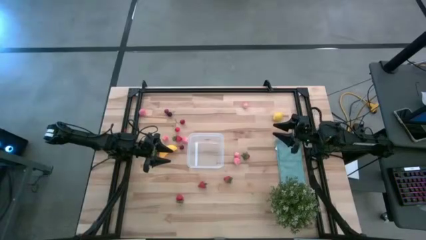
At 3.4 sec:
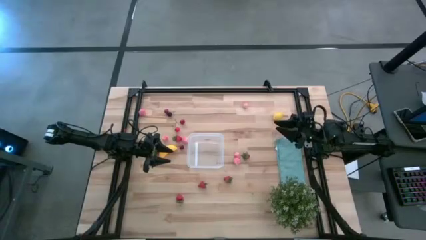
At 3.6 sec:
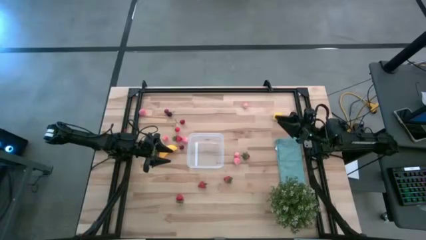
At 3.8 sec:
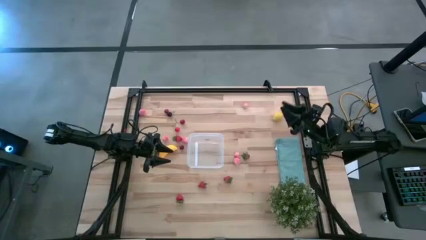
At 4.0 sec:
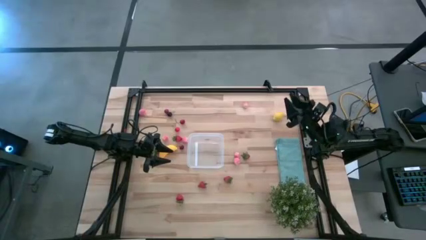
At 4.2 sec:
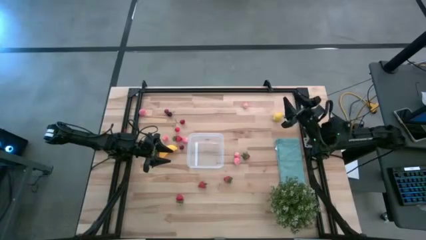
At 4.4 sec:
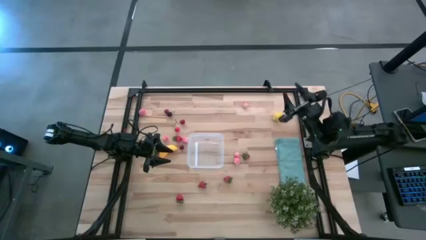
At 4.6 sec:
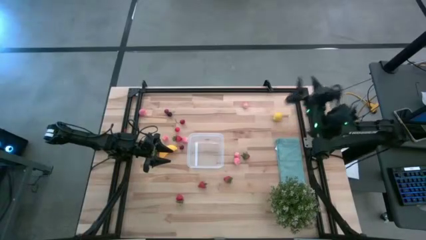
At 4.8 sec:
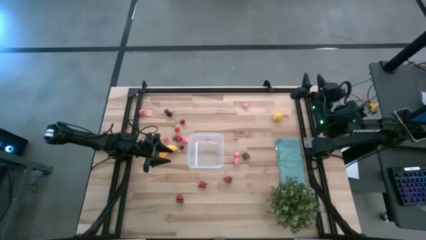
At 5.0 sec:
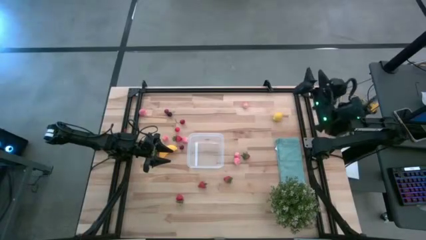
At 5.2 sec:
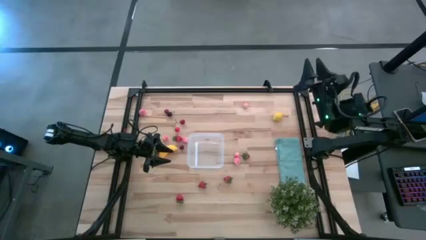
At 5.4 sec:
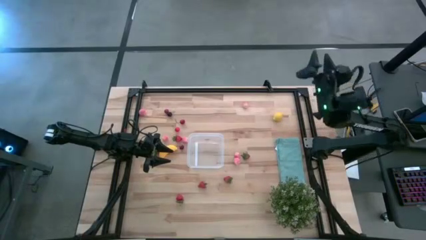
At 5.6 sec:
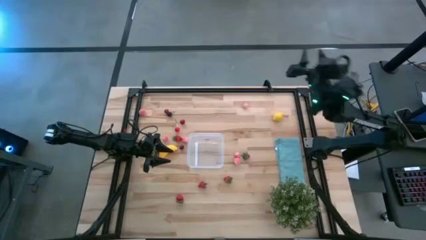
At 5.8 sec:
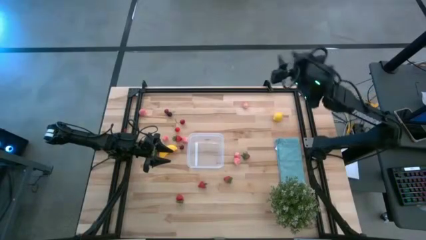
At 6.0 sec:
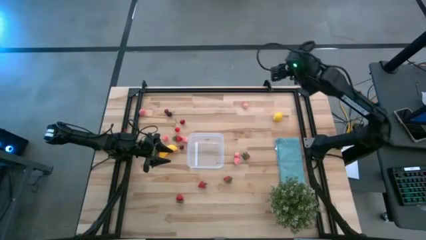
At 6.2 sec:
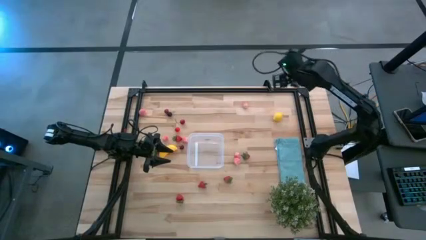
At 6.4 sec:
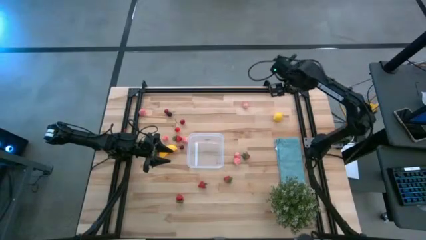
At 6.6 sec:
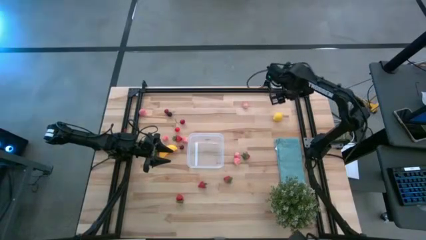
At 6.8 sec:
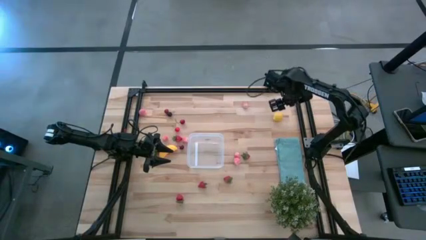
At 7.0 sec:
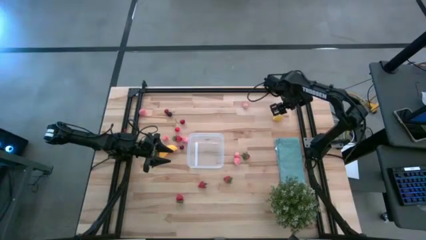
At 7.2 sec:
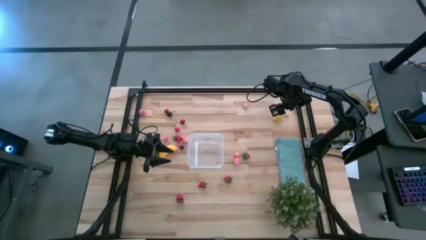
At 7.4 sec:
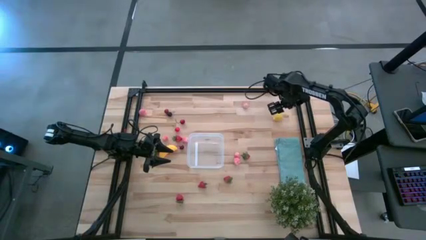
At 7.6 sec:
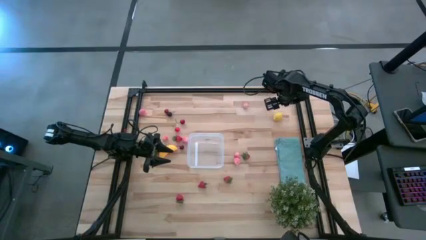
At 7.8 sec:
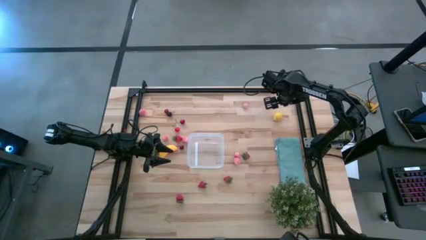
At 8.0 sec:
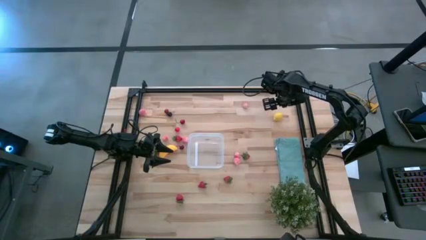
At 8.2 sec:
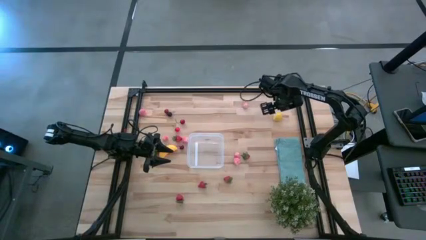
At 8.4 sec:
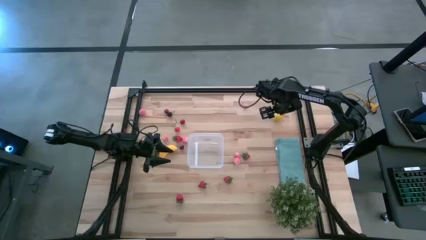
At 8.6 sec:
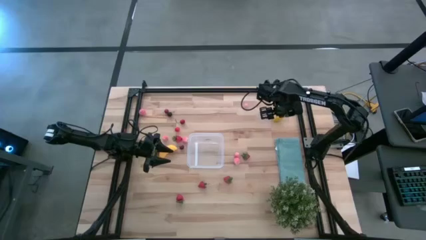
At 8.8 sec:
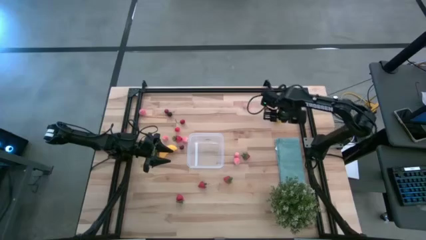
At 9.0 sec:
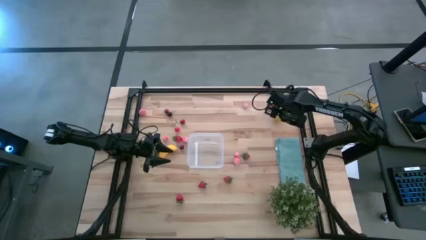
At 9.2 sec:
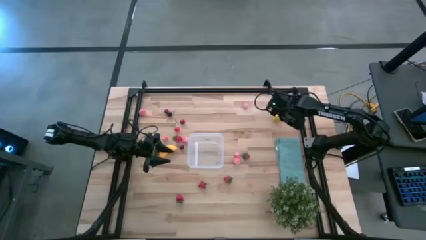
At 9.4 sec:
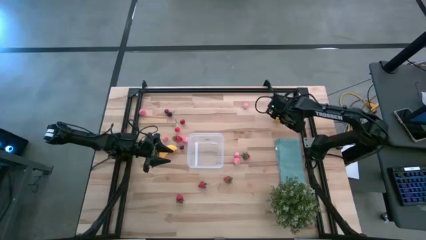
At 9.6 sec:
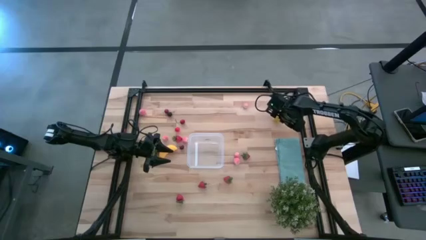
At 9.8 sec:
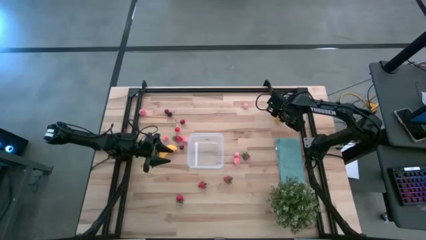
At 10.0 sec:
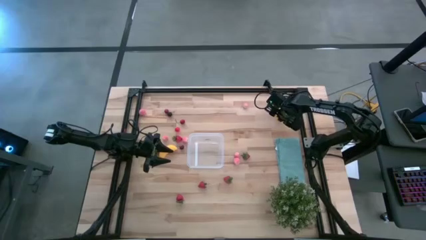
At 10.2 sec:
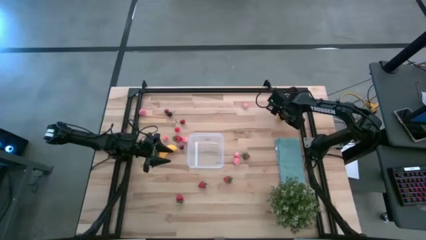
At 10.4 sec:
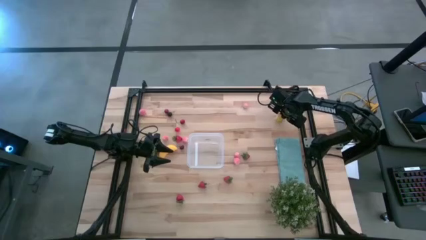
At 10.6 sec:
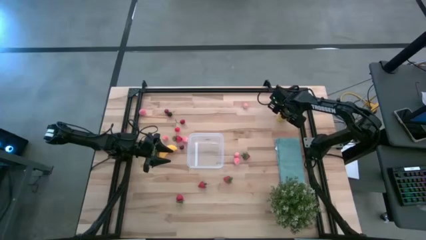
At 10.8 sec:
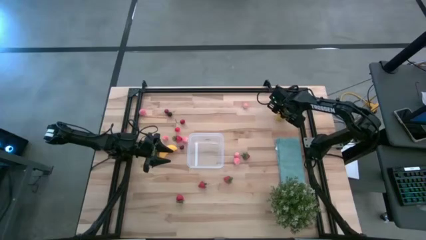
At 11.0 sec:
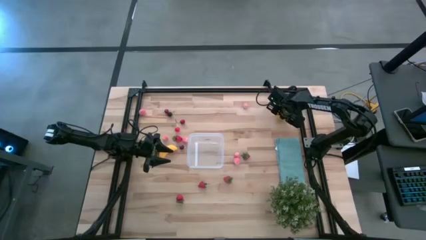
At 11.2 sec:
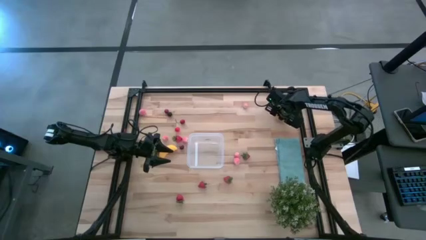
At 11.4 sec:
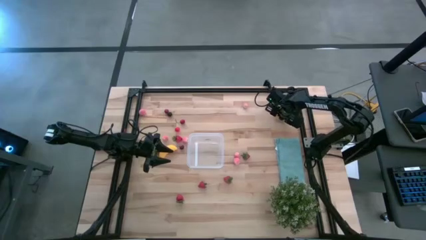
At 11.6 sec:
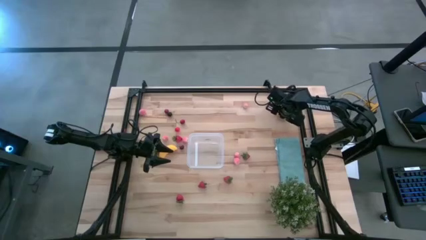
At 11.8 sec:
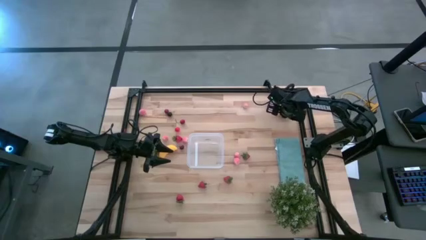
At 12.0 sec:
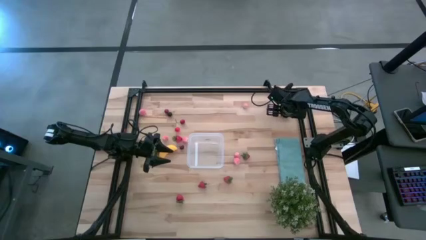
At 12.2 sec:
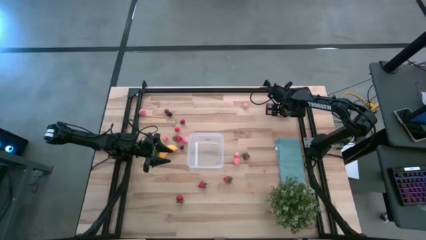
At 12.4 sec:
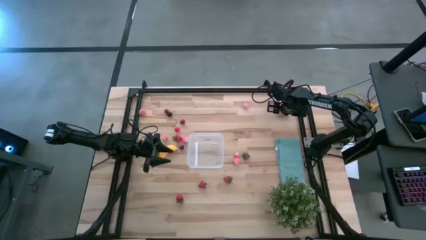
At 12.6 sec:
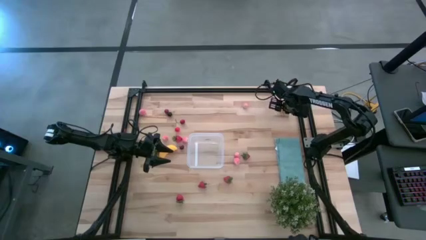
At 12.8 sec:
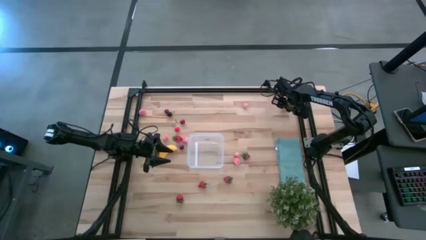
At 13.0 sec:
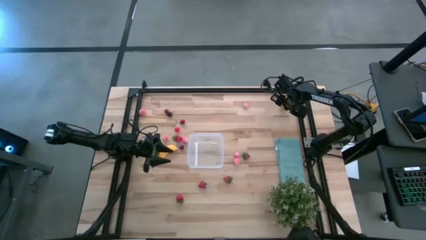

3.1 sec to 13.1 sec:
Task: Pick and placing Produce into tupperware
Put the lemon into the transparent bin
